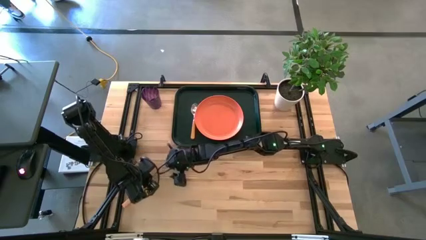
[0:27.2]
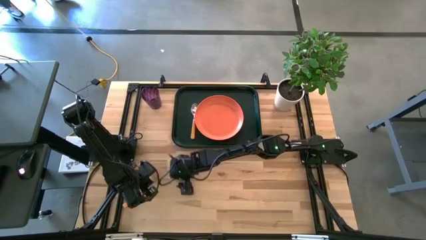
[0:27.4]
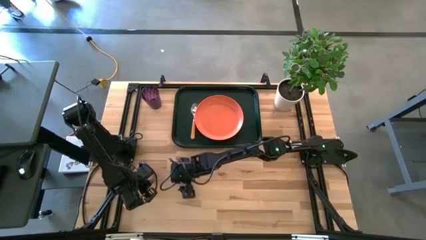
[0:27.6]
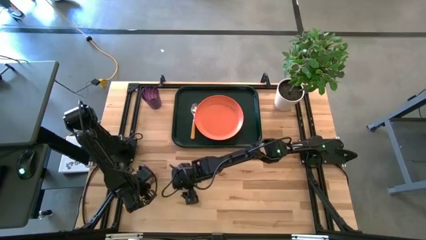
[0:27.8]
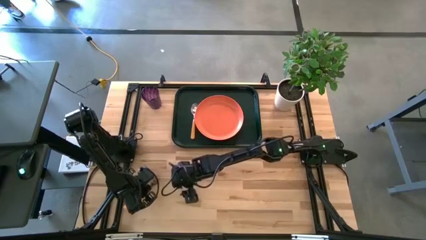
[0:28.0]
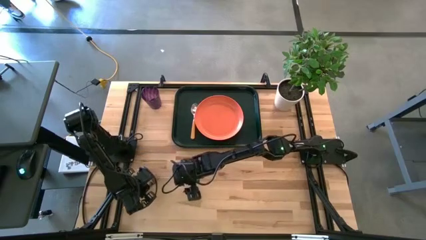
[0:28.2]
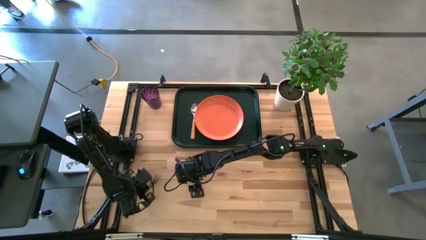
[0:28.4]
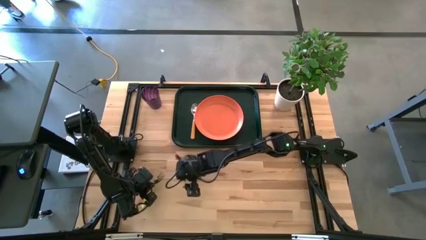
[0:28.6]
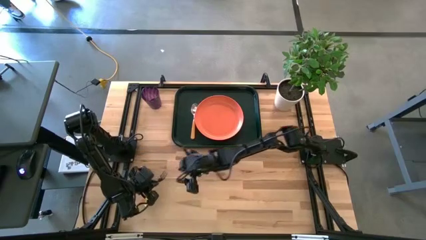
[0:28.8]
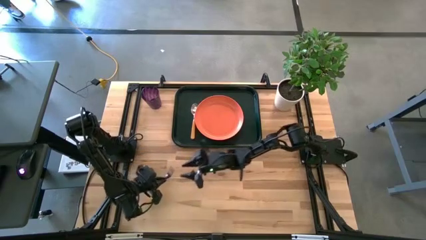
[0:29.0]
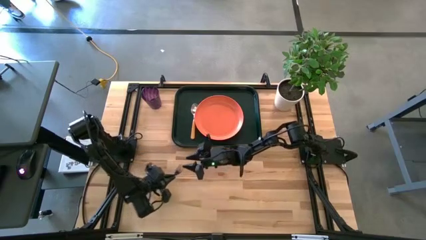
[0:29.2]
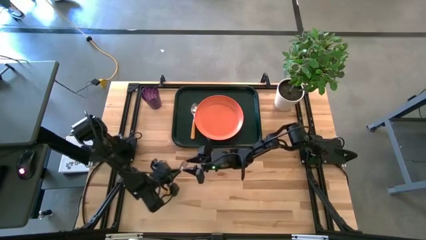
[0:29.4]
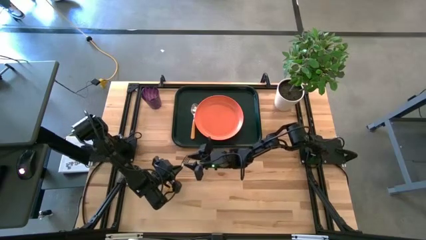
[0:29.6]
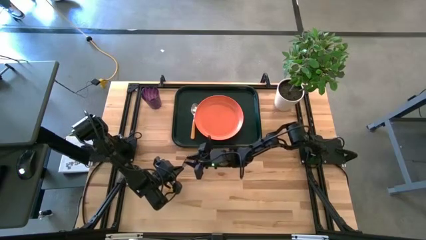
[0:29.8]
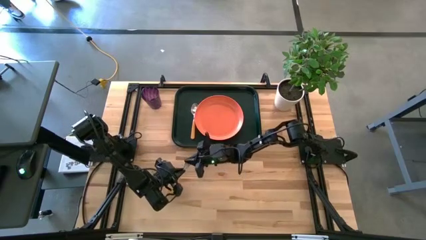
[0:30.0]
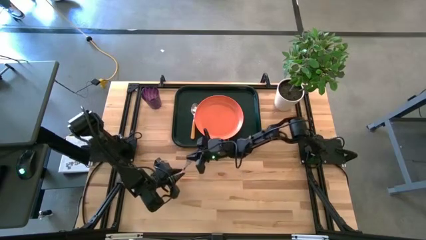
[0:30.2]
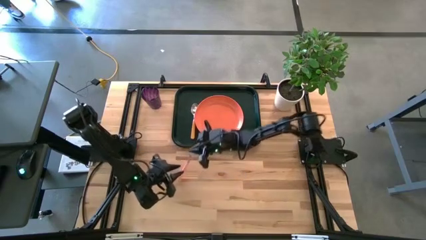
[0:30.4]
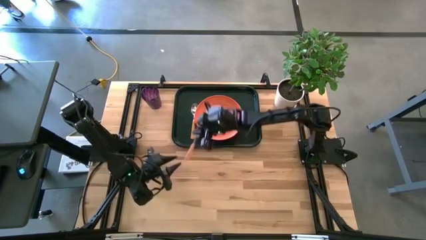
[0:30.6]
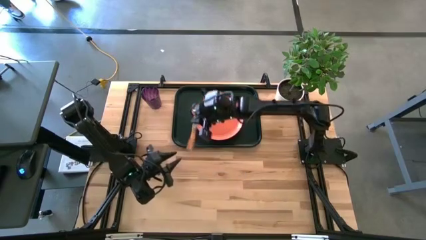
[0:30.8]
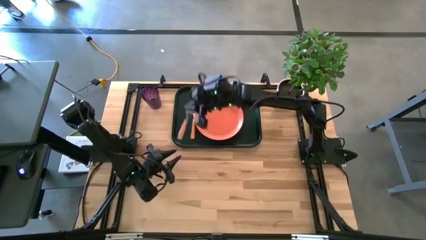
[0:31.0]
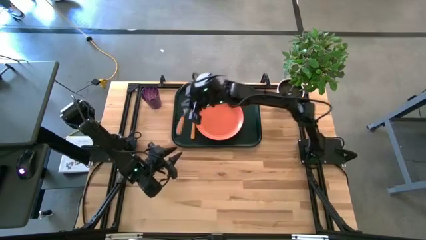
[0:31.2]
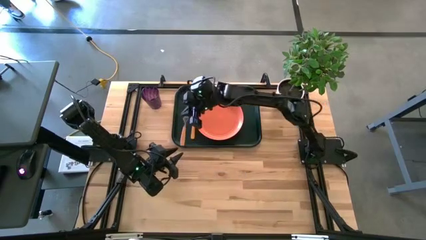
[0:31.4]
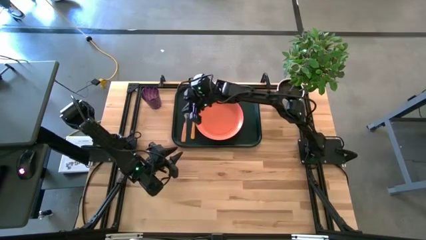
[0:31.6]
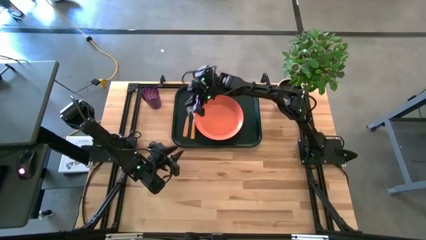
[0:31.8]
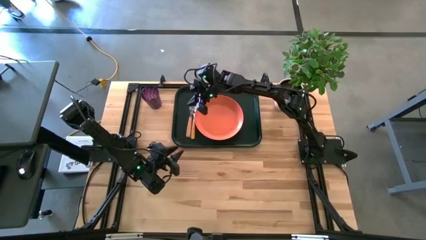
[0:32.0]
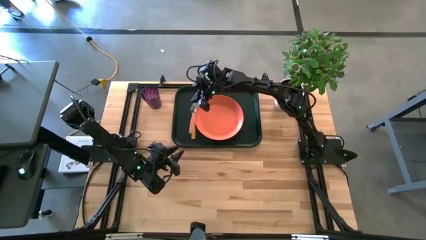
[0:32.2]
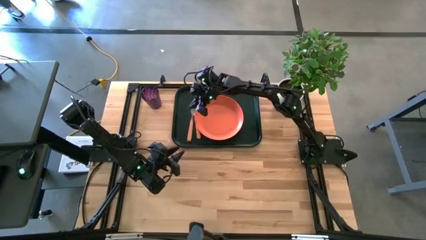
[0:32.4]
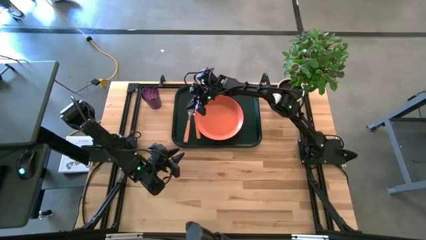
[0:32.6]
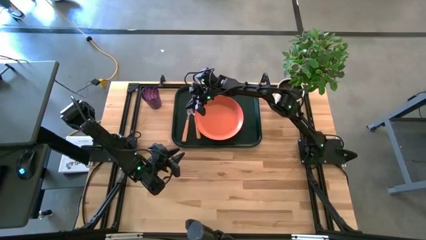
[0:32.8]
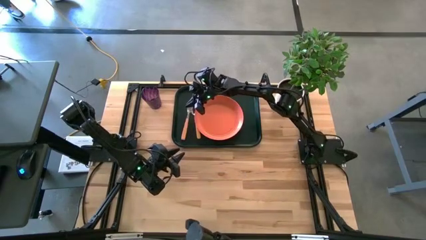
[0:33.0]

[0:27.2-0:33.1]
Task: Pick and place plate/cup/fork/spoon on tray
Put the orange fork on the black serving tray to the left of the orange spoon

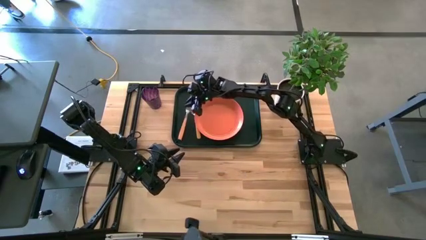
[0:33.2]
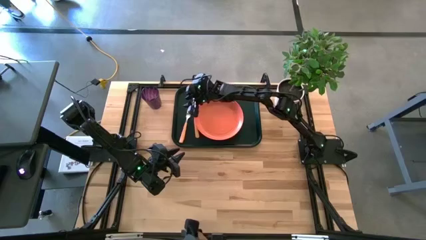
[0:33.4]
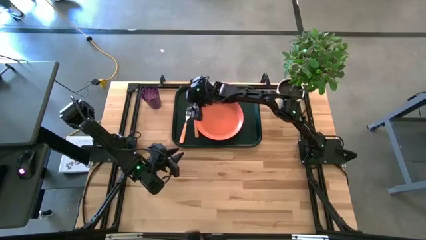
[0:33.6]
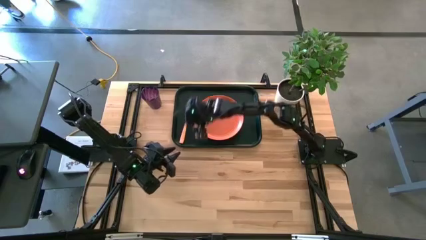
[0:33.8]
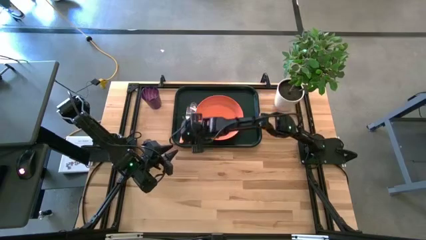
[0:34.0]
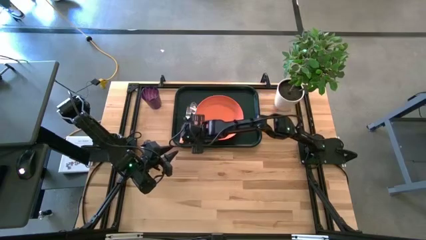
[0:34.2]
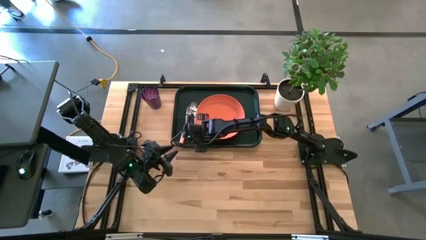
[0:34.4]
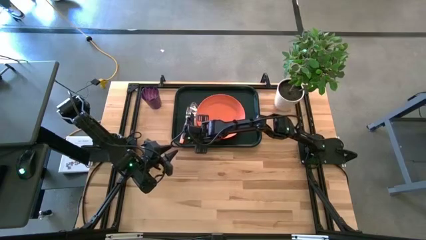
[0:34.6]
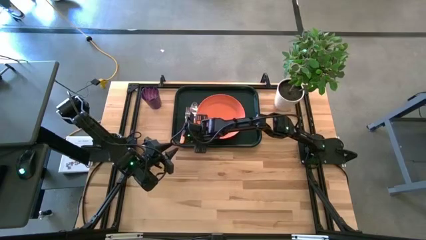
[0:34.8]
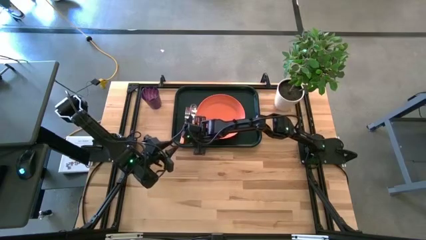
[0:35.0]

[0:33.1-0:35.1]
Adjust the orange spoon on the black serving tray

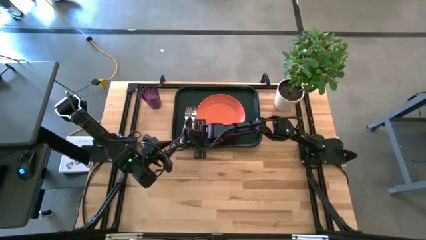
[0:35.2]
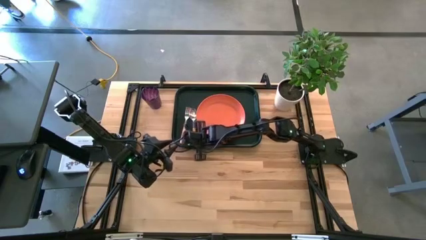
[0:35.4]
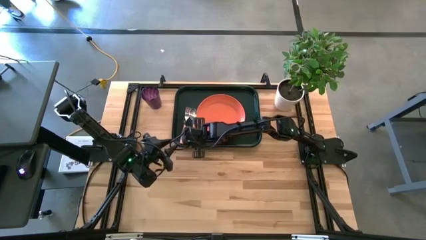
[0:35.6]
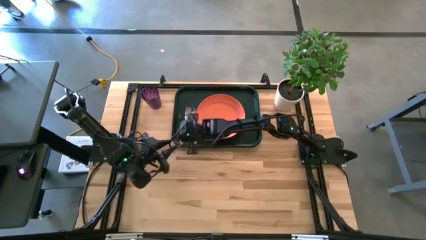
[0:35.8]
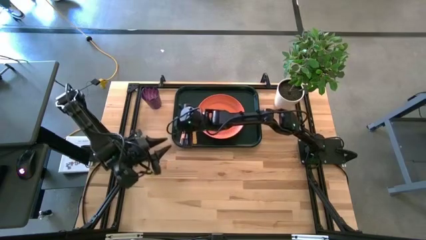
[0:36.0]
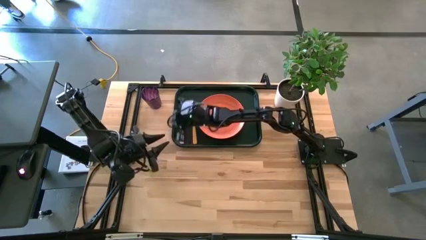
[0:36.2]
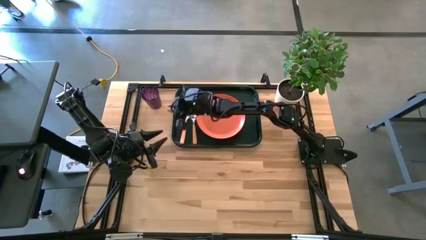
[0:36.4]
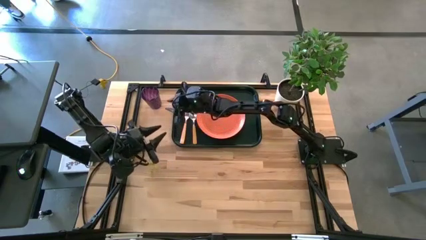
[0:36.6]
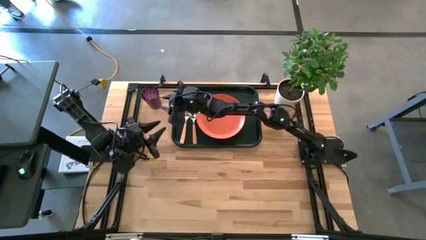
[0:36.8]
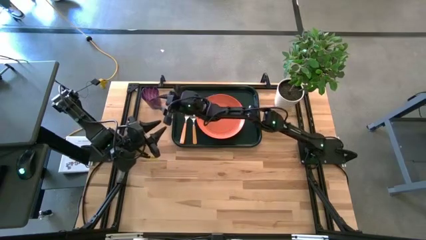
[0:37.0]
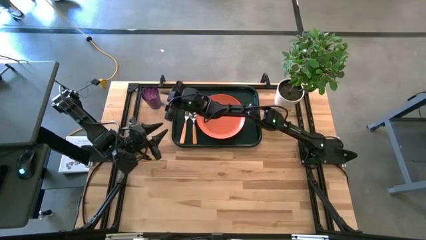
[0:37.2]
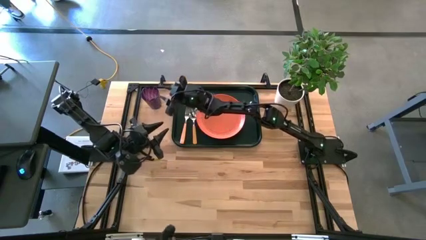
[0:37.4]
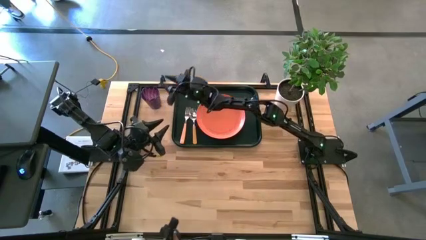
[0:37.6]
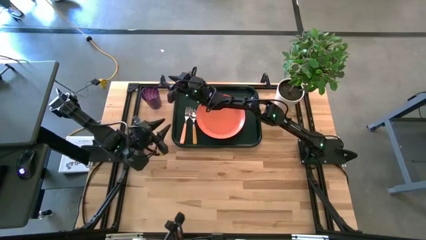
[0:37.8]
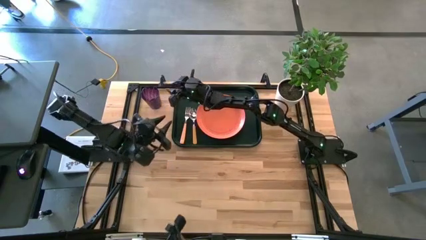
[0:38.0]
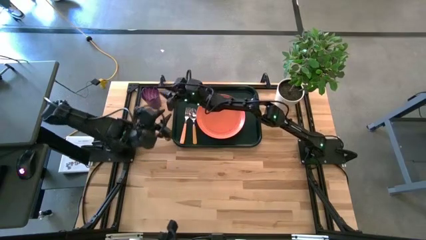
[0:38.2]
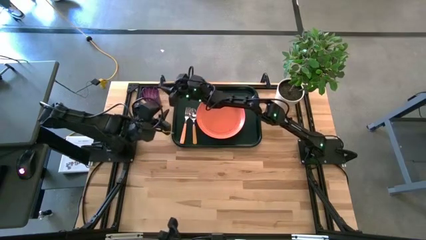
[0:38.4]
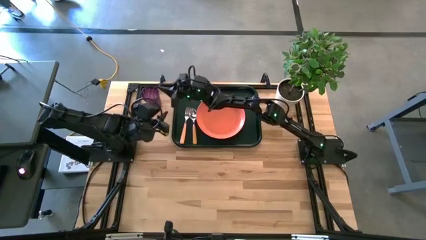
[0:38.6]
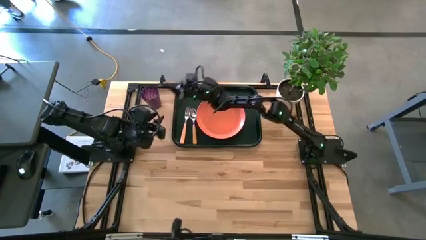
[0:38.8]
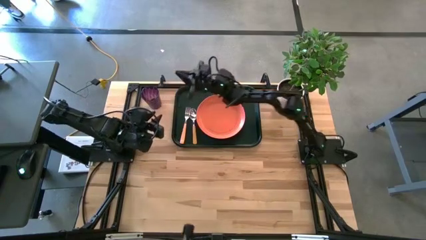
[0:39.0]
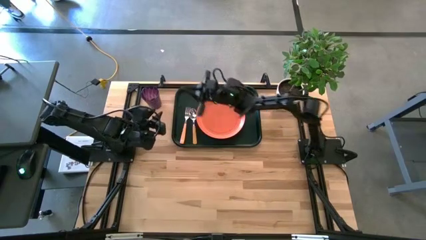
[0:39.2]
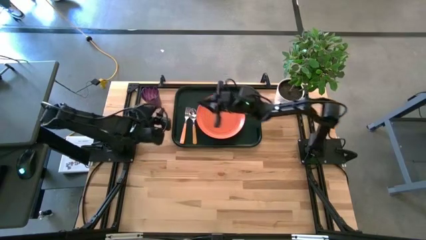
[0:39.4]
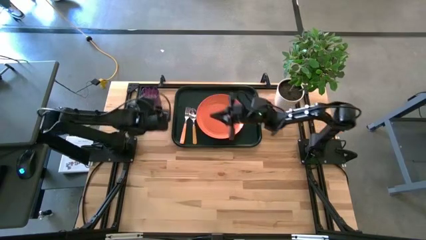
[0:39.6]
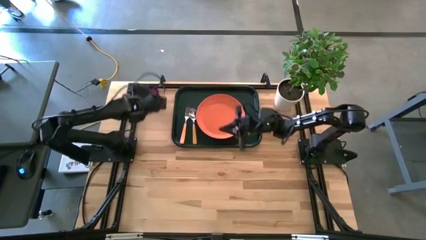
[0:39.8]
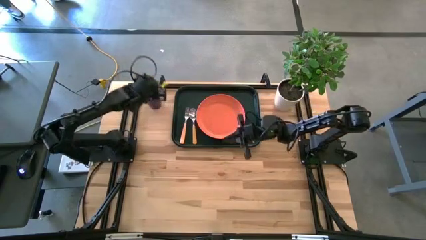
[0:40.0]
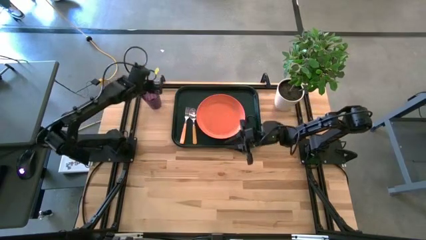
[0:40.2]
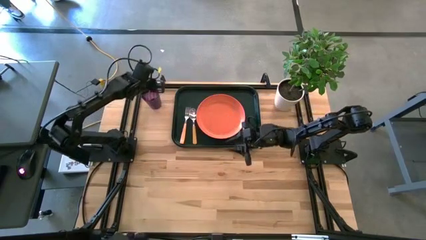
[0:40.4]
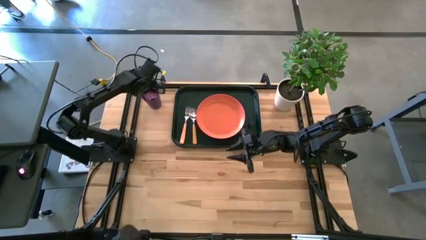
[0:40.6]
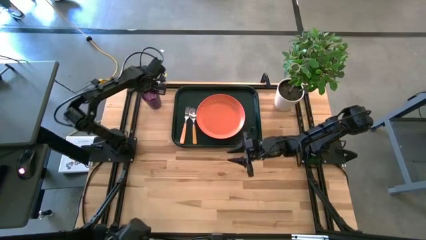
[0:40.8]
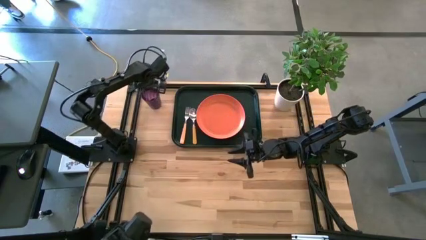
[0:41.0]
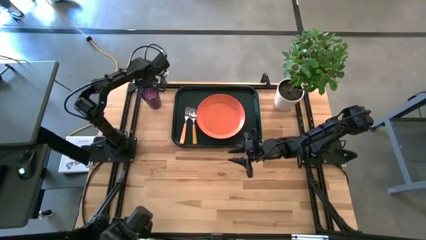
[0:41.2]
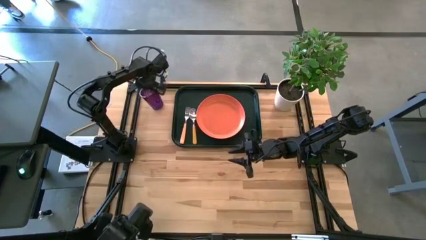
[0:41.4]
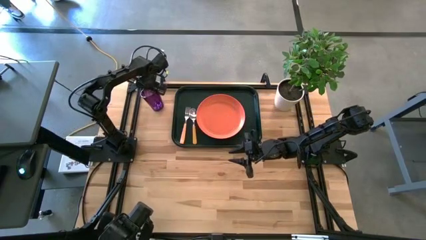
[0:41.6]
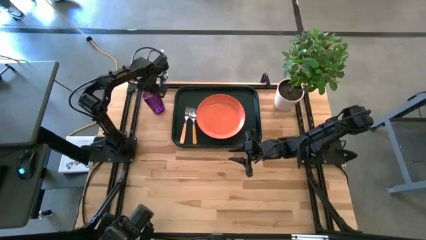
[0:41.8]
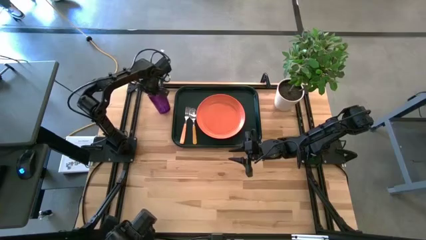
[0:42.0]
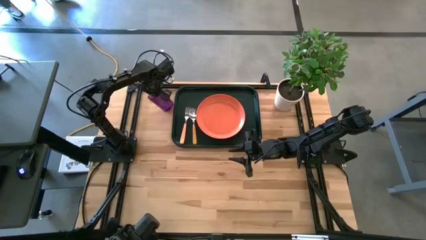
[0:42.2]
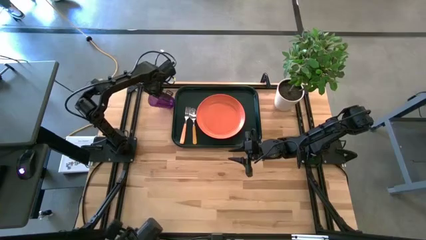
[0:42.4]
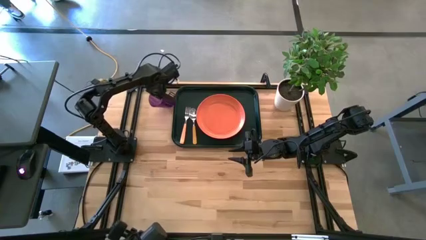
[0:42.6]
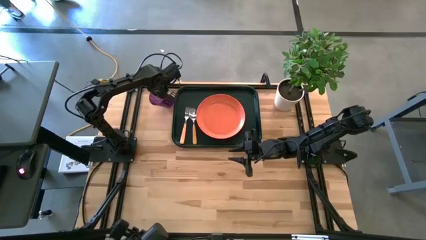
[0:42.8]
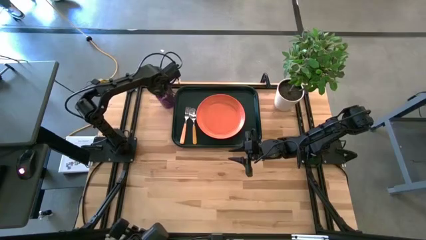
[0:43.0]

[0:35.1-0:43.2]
Put the purple glass on the black serving tray to the top right of the orange plate

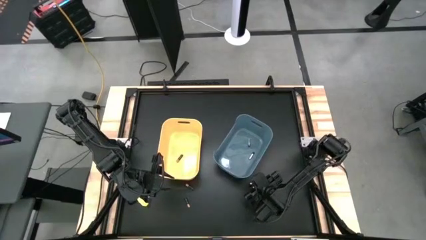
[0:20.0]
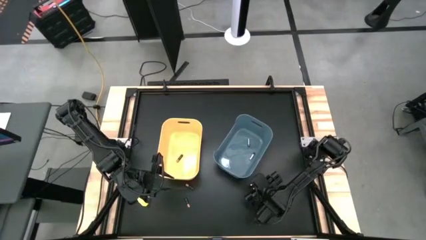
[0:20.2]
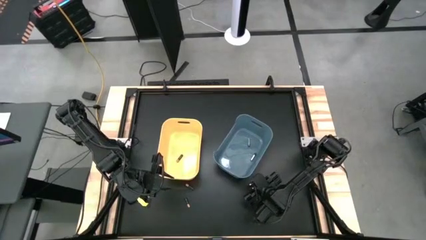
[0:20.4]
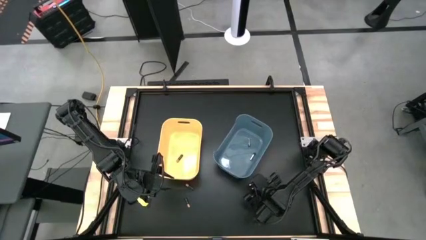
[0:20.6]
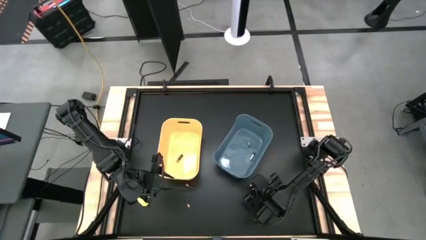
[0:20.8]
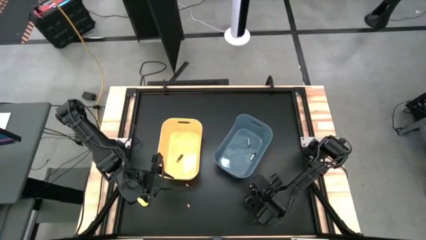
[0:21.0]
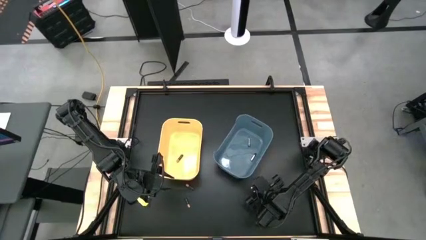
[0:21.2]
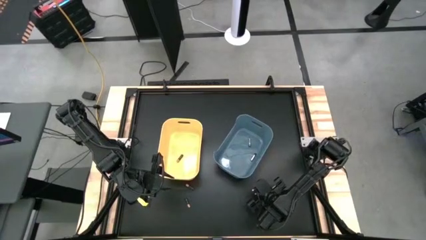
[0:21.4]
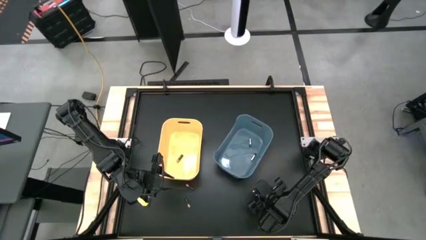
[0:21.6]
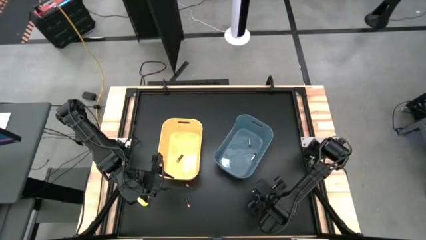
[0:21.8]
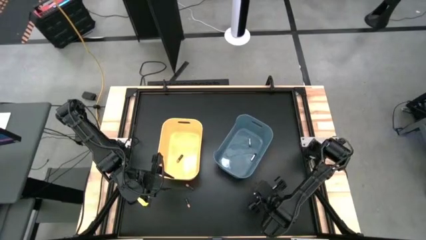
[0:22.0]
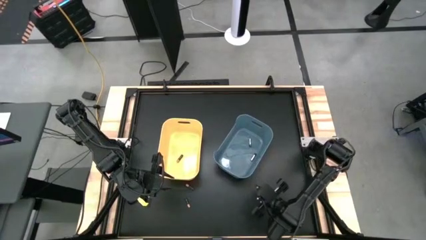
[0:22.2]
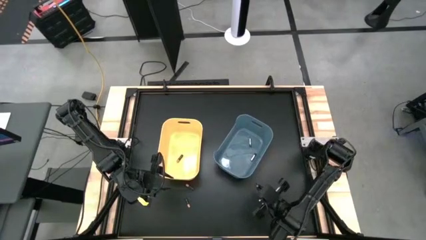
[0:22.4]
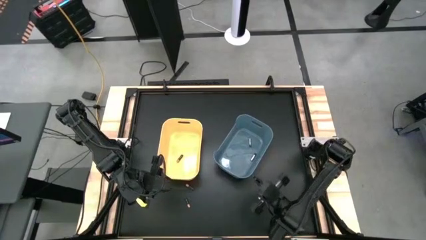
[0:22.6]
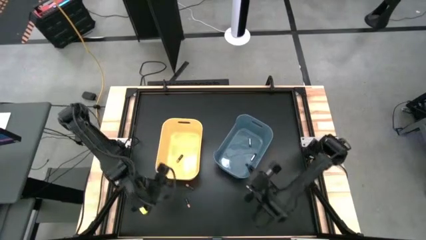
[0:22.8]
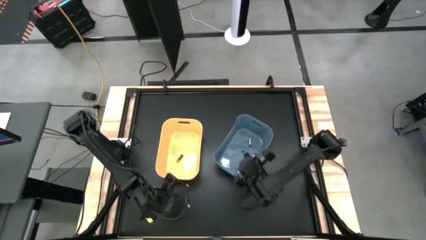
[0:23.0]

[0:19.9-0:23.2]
Task: Sort batteries
Put the silver battery into the blue bin
